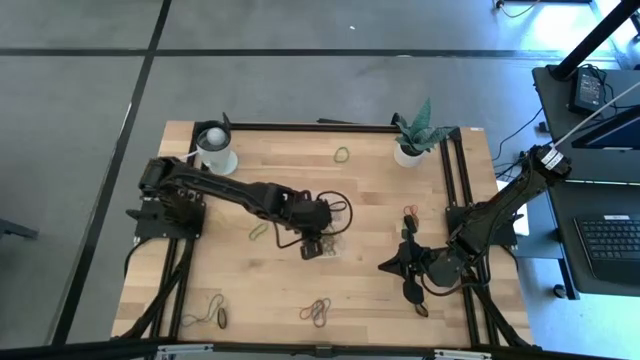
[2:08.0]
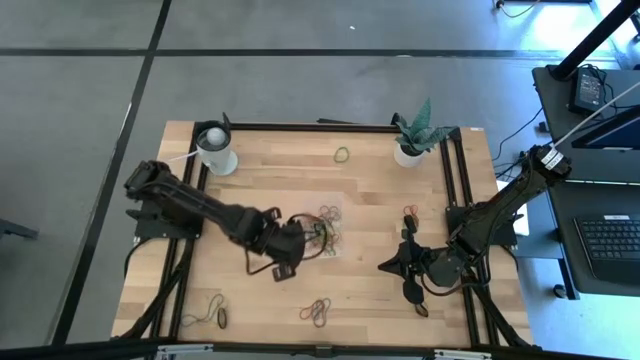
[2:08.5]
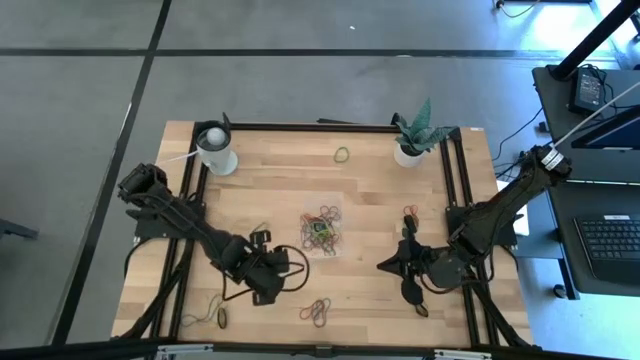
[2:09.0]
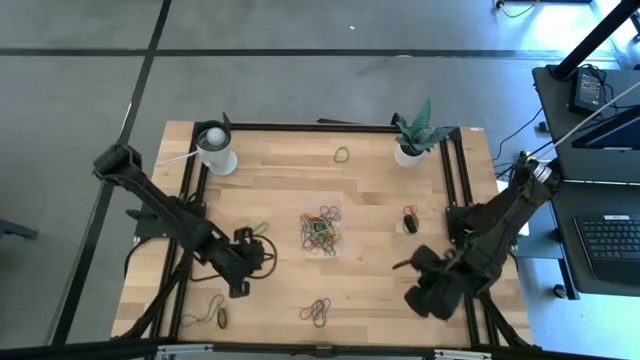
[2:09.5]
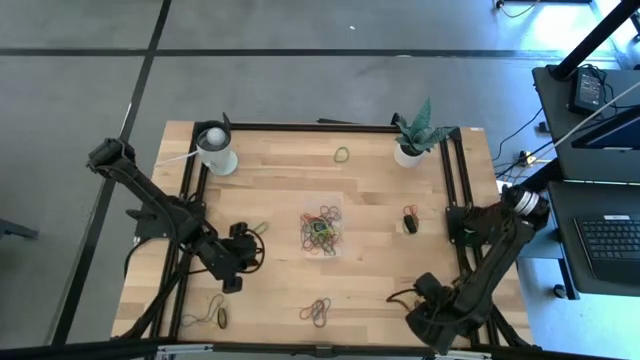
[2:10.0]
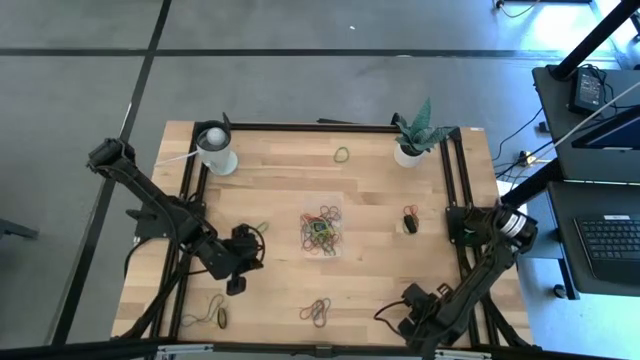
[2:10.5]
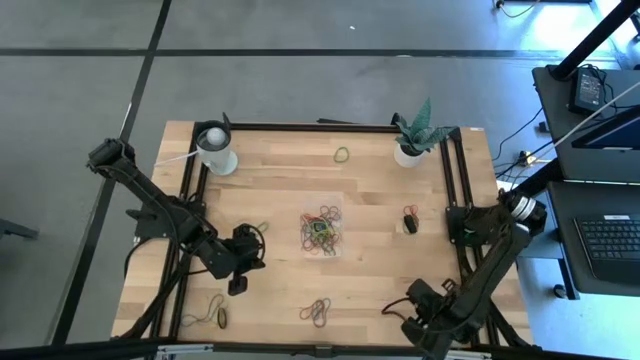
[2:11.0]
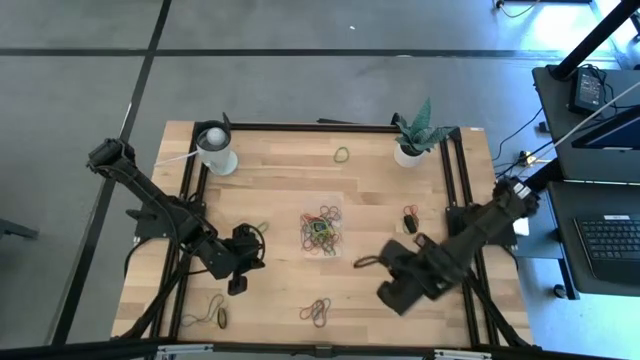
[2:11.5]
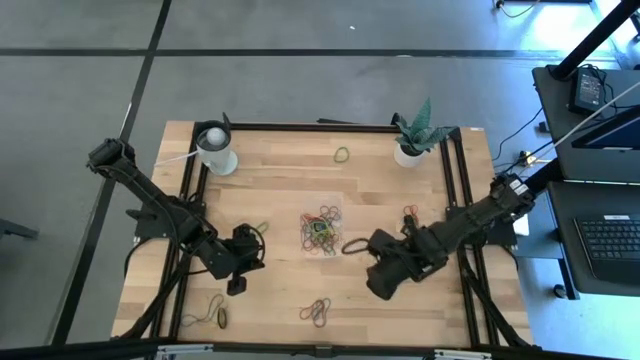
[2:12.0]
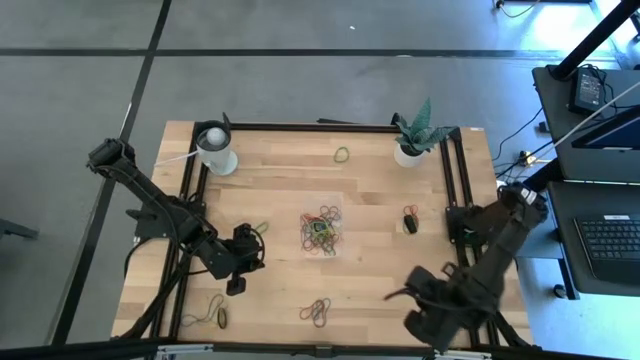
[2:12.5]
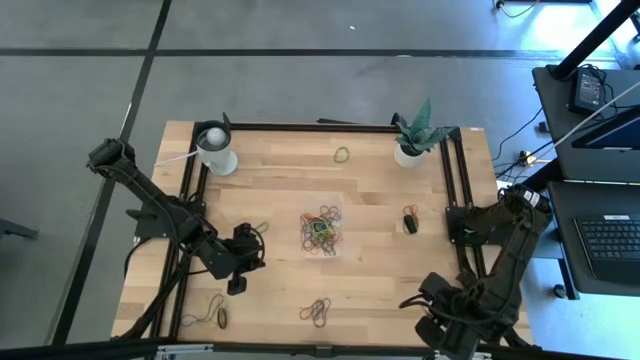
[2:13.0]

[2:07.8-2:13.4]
Task: Pick and place rubber bands into bin
Put the black rubber band into the transparent bin

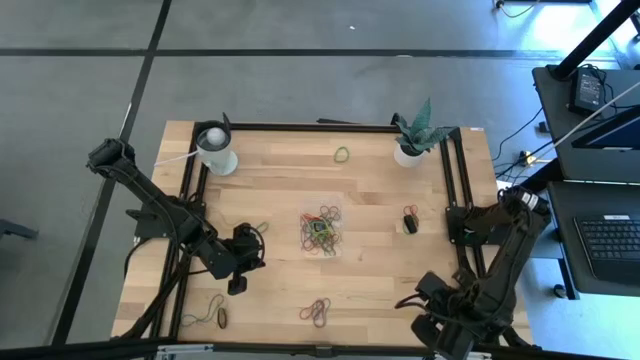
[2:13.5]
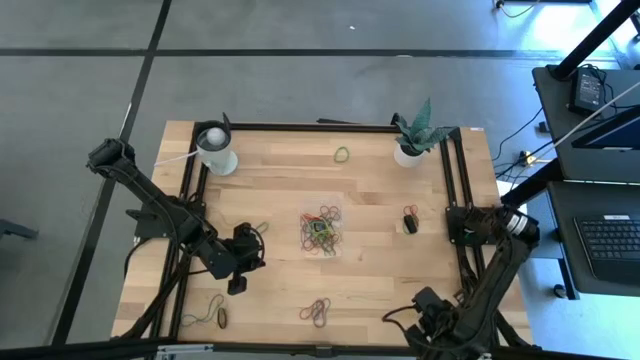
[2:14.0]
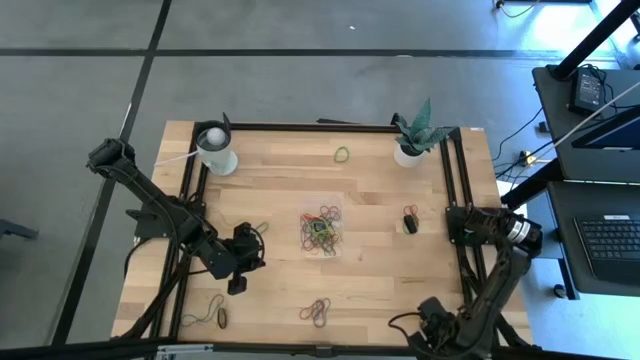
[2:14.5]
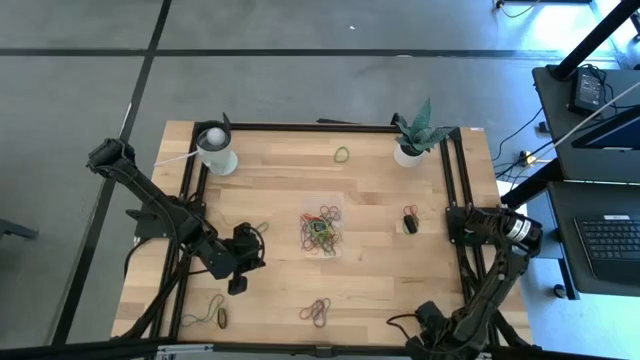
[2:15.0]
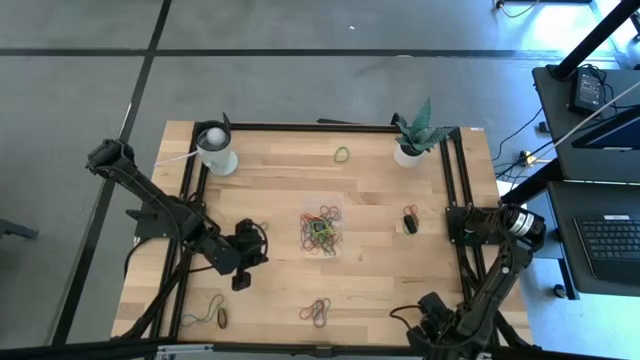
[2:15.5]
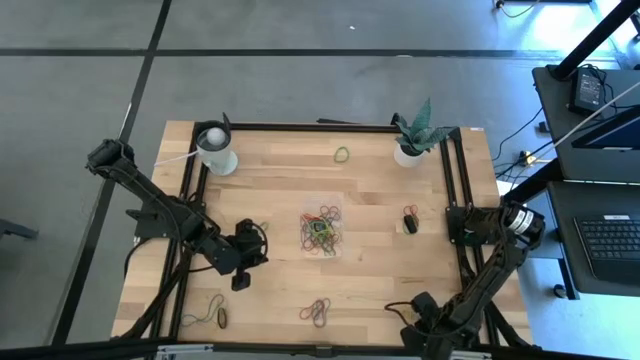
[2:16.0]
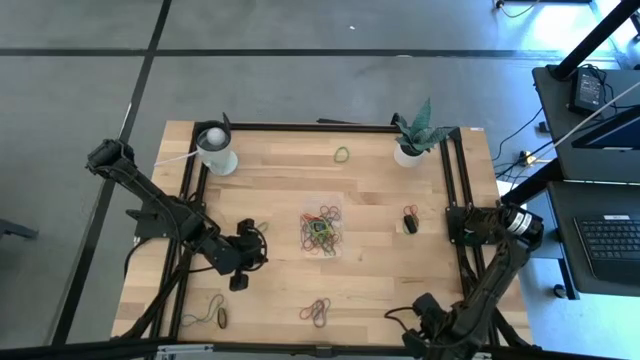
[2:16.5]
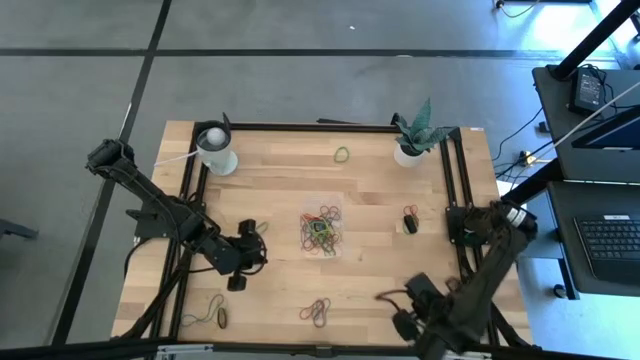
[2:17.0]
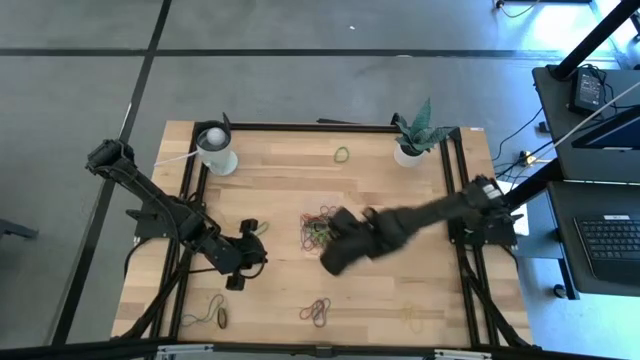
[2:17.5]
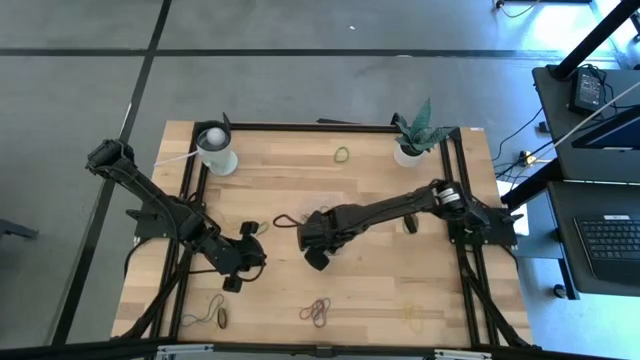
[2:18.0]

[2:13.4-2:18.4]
Put the black rubber band into the transparent bin

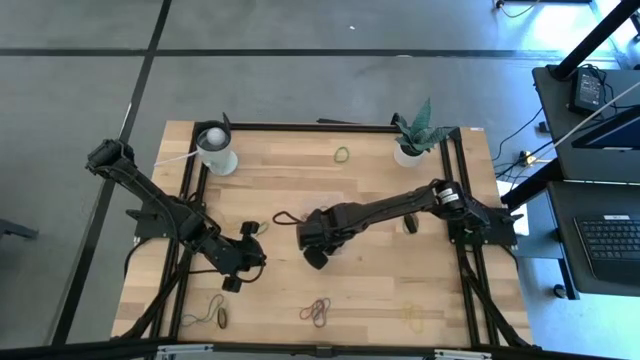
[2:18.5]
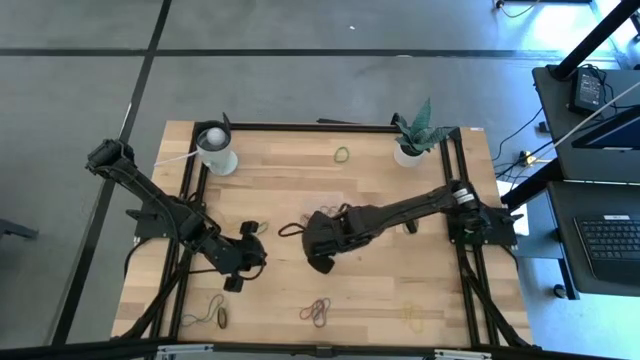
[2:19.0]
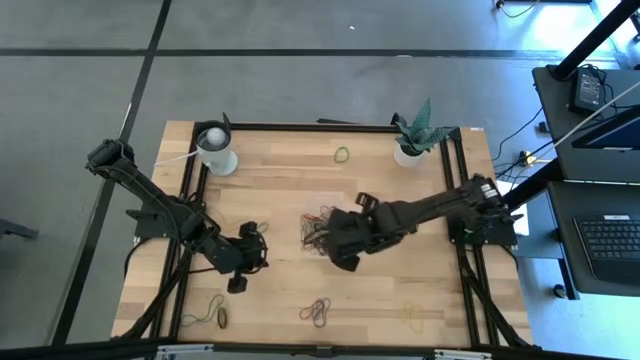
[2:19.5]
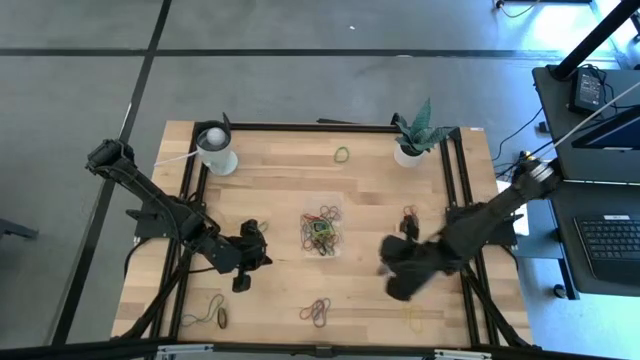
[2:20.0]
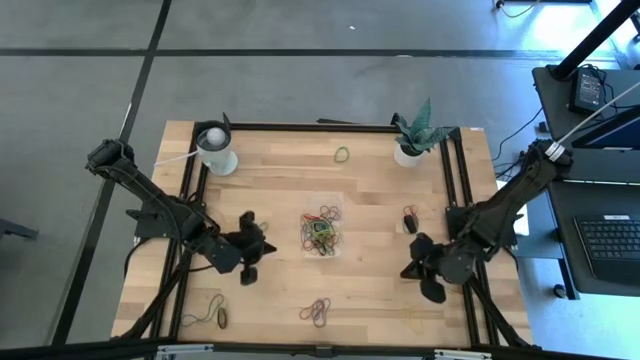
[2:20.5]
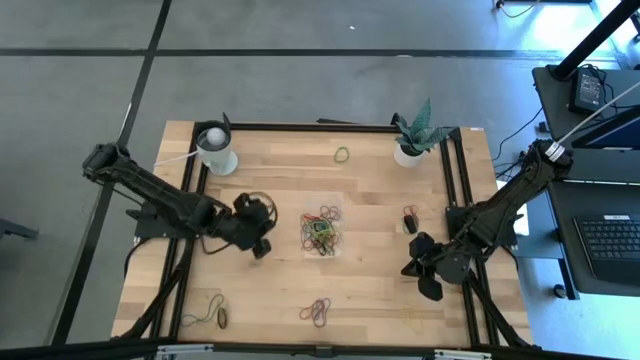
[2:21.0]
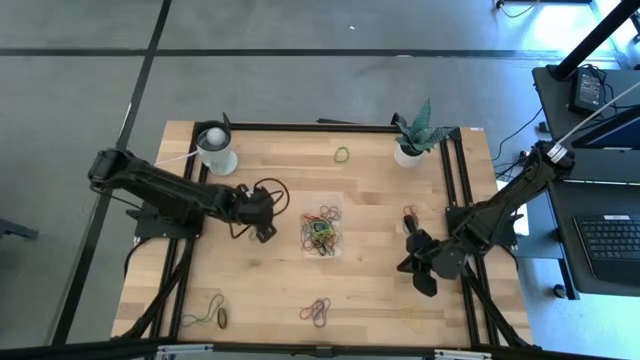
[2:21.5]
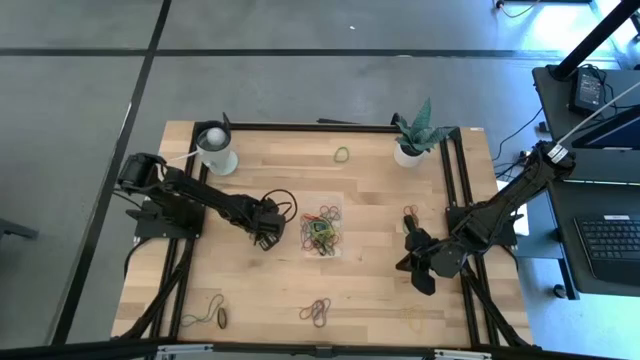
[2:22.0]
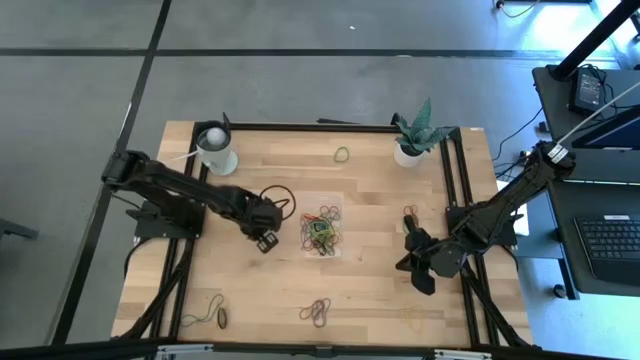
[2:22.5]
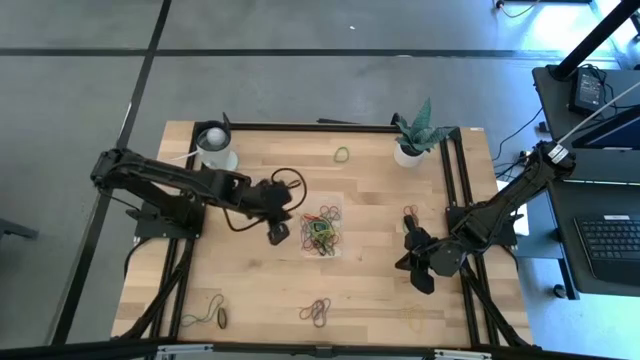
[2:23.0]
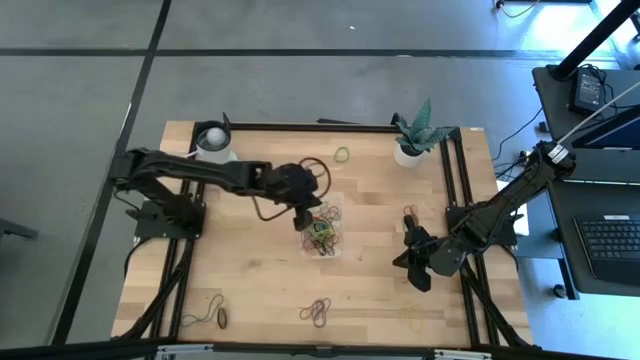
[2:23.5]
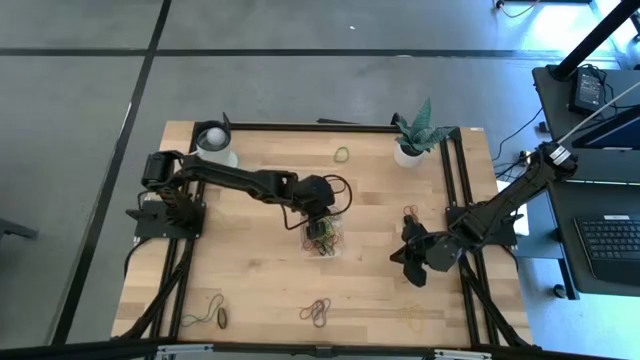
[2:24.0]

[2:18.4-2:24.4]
Put the black rubber band into the transparent bin

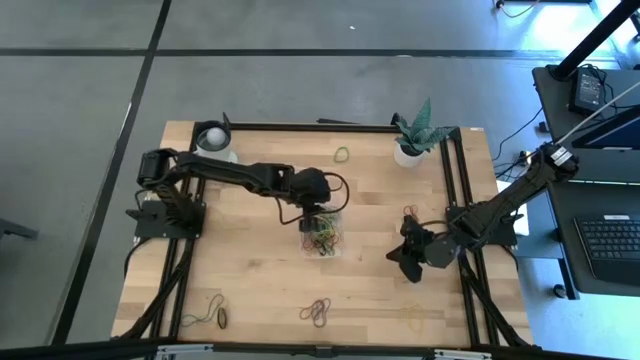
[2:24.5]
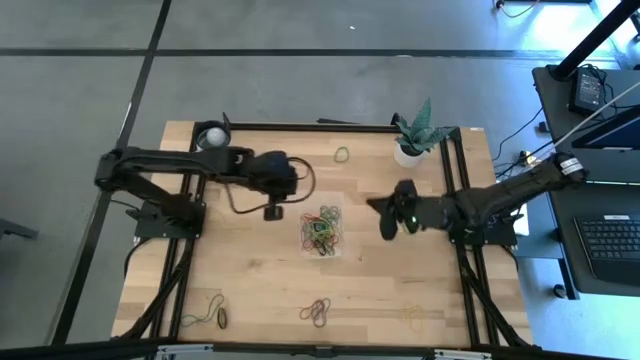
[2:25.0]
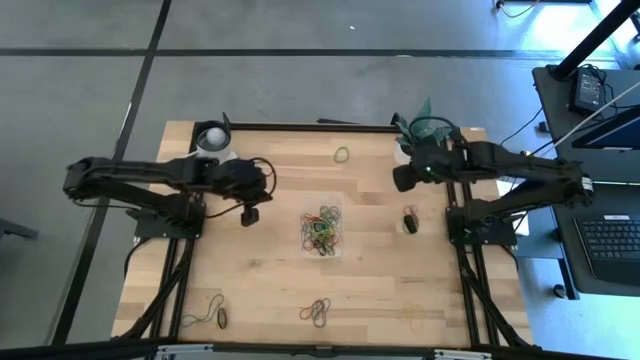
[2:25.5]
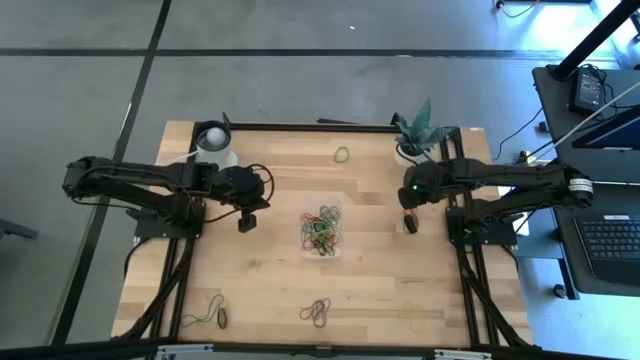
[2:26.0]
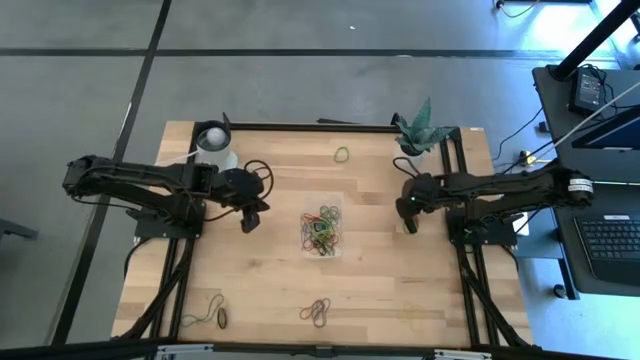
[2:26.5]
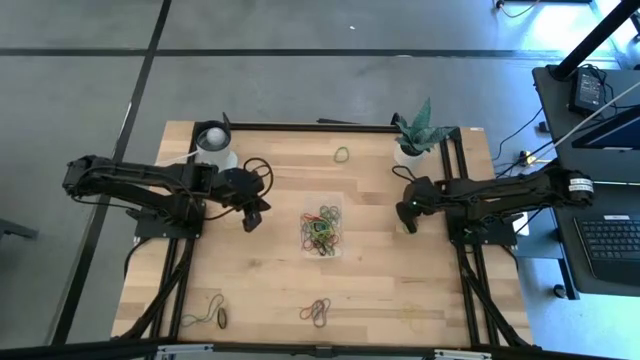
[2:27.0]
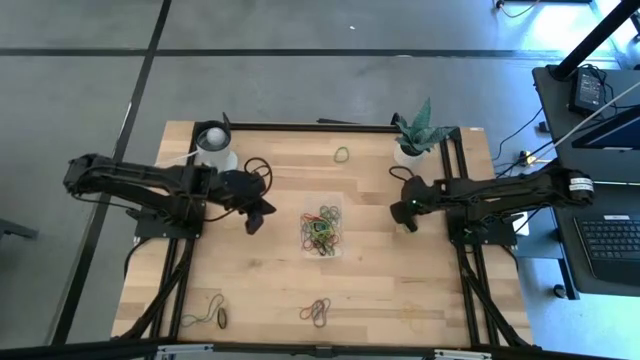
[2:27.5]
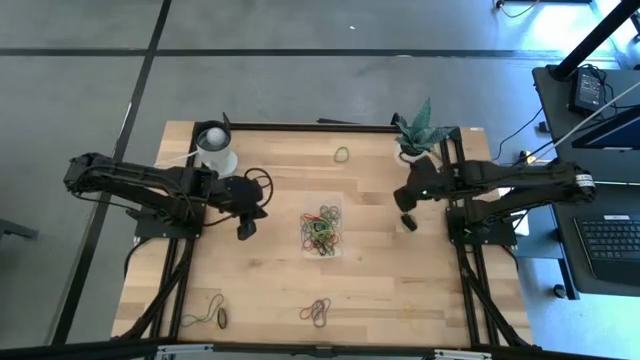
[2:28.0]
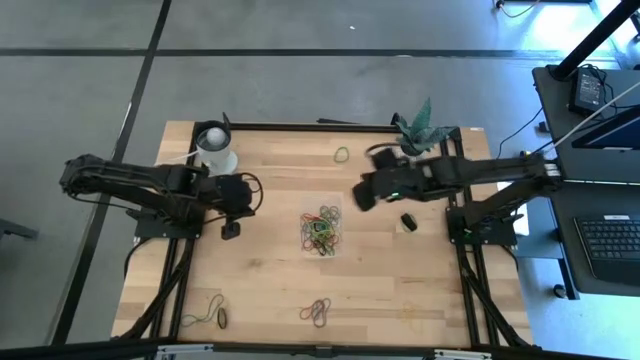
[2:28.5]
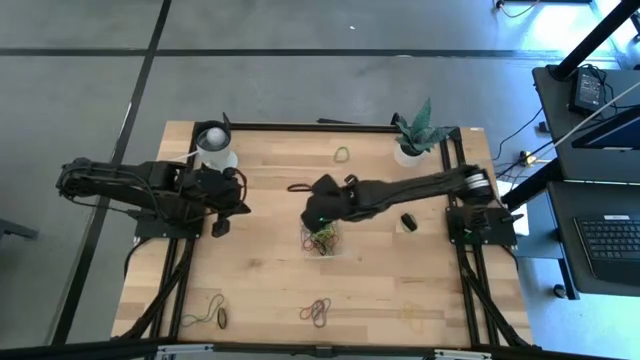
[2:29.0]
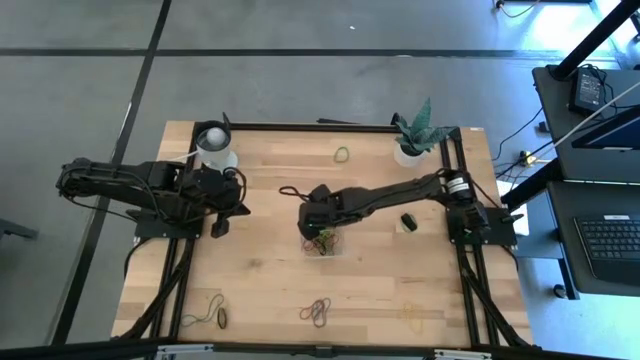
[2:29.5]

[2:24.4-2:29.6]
Put the green rubber band into the transparent bin
